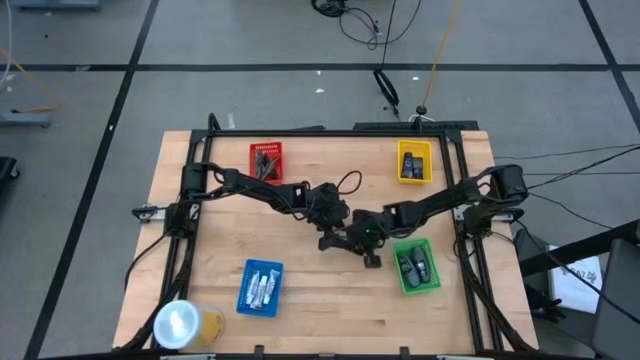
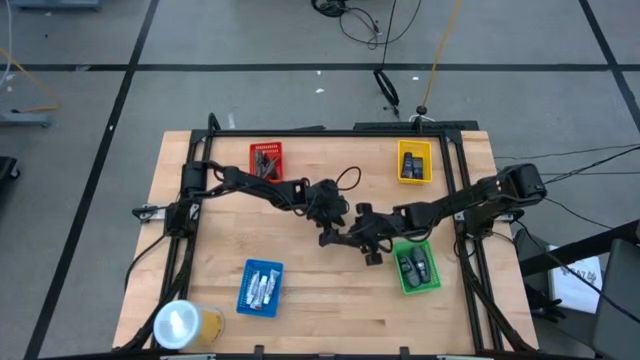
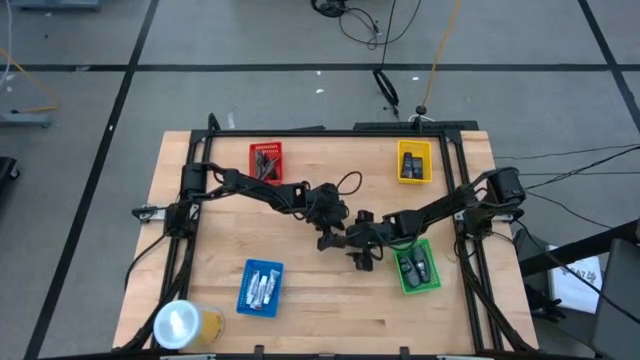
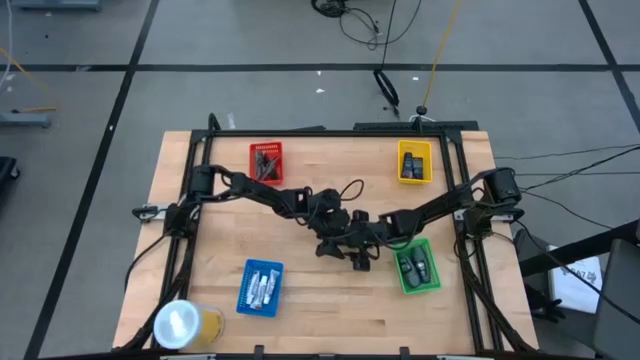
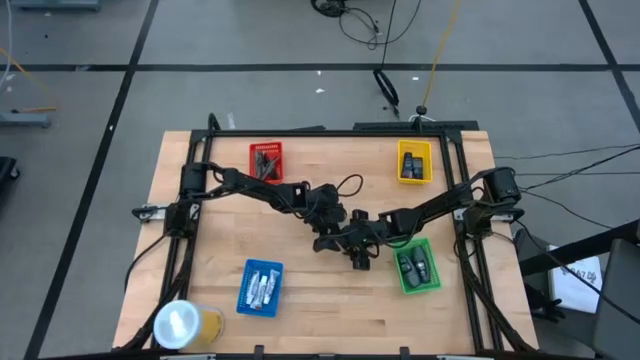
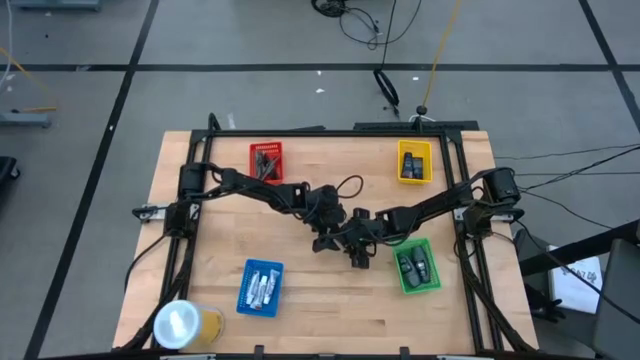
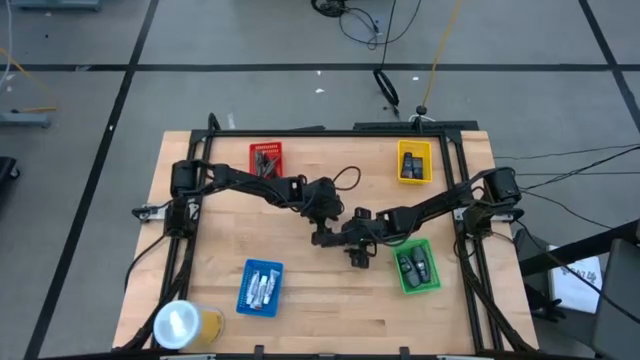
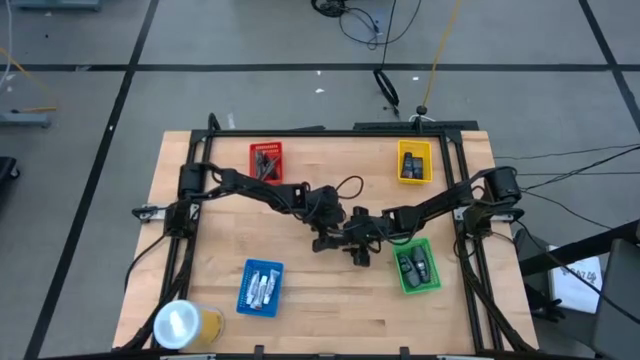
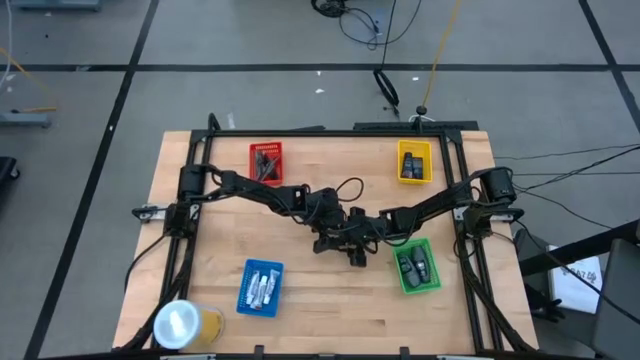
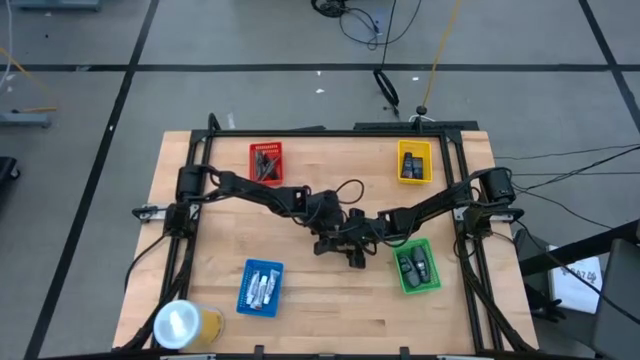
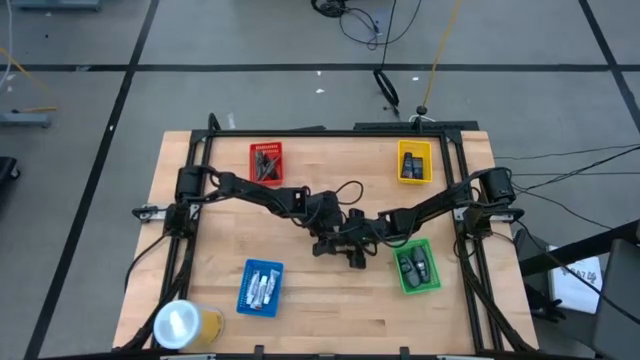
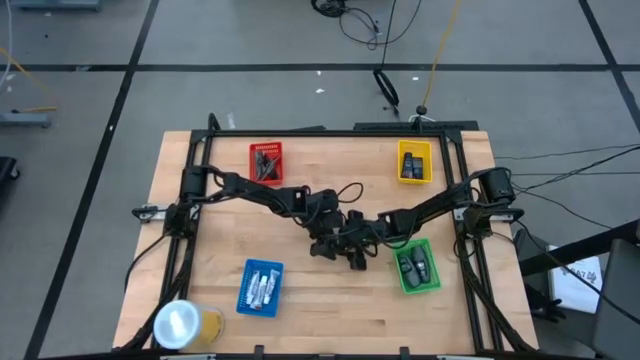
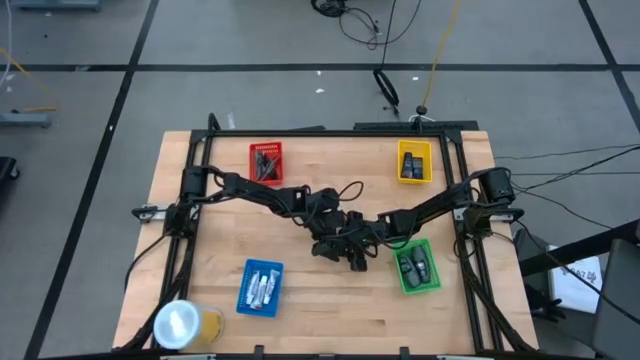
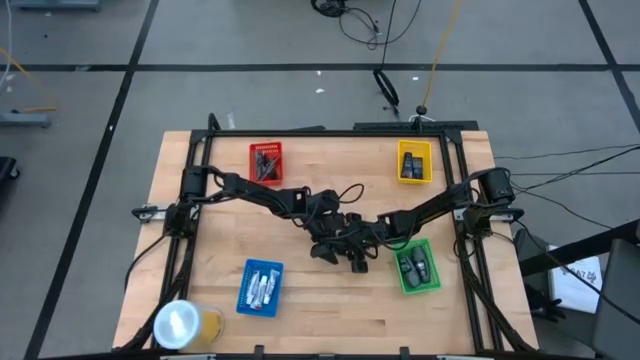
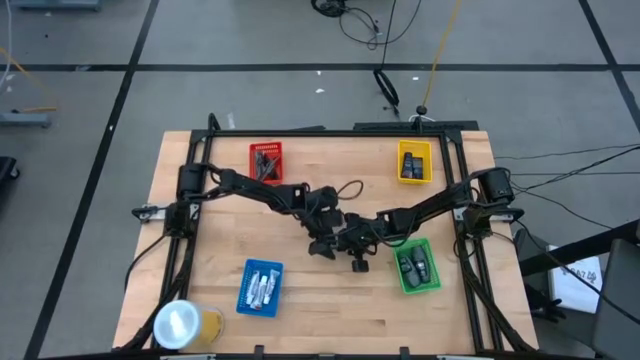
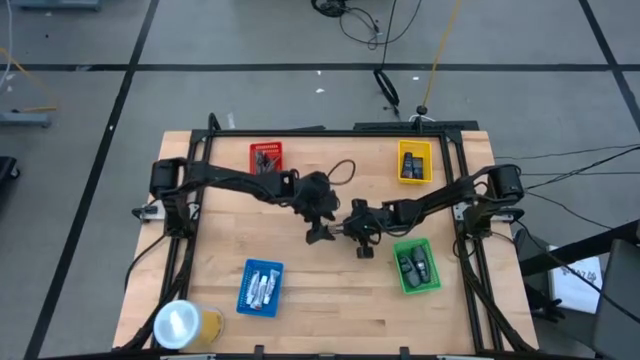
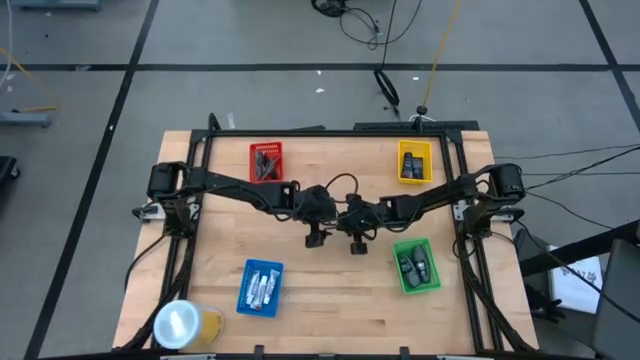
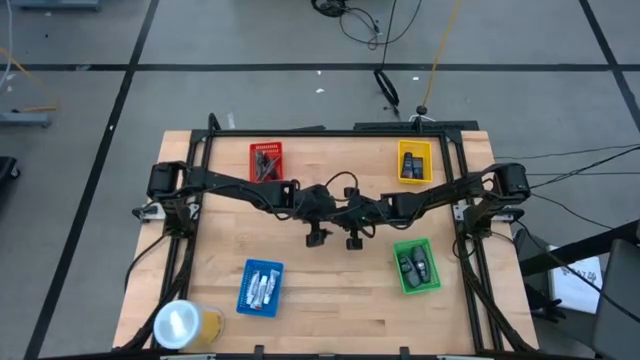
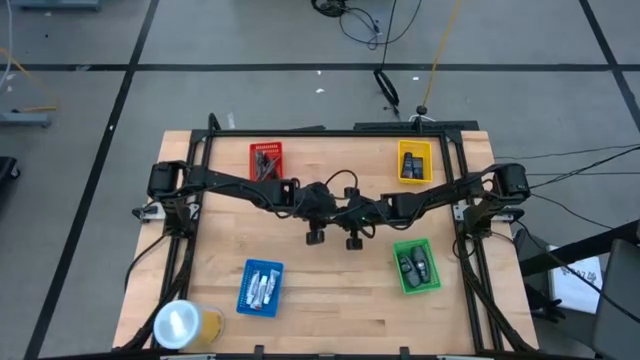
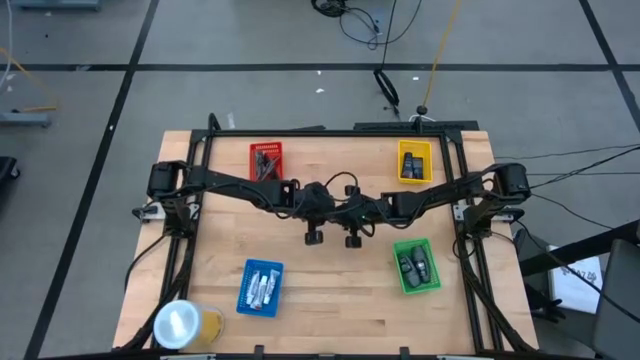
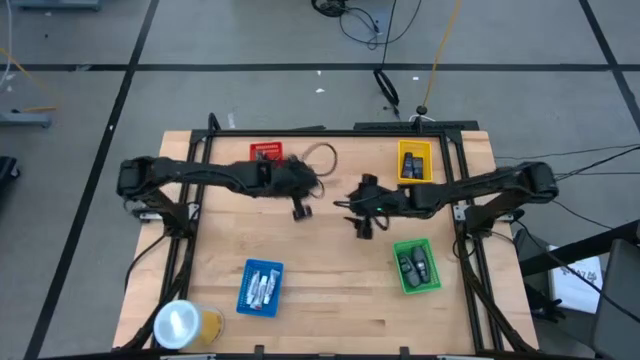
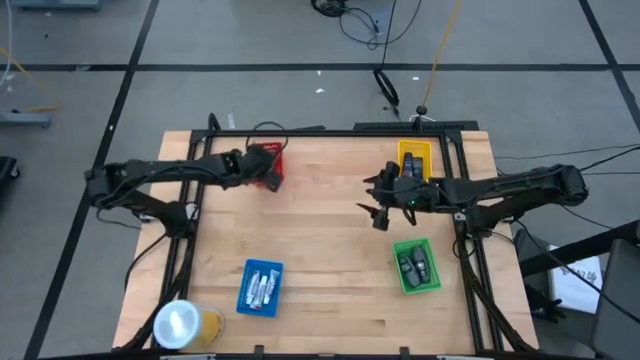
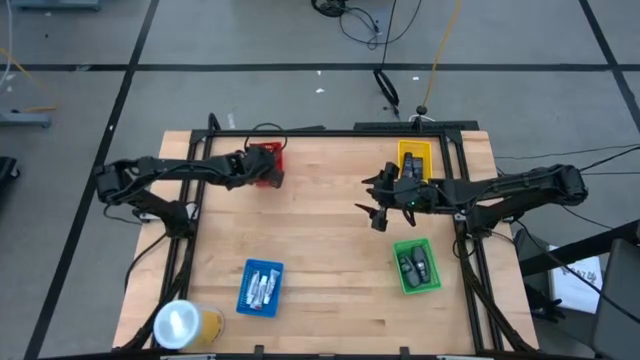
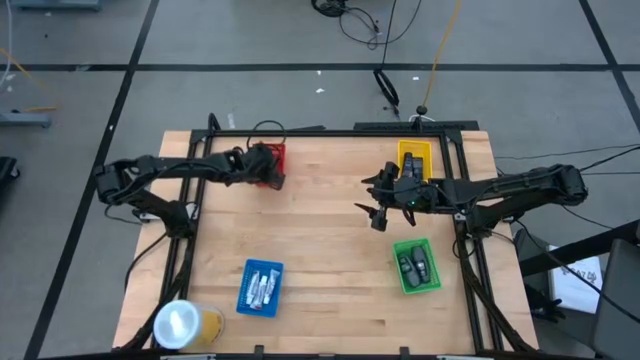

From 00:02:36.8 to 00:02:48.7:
Task: Pick & Place Travel size toiletries
Put the black comb into orange basket

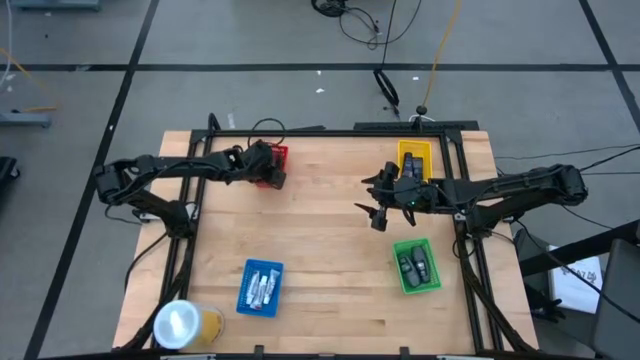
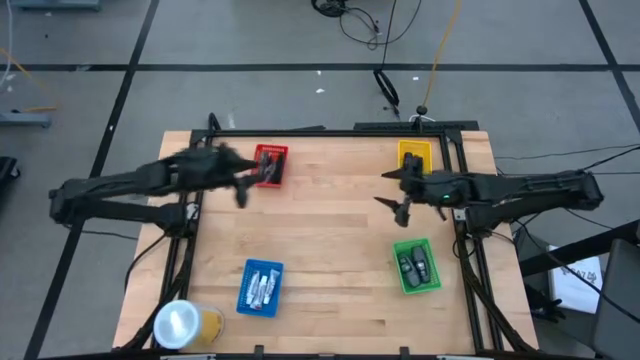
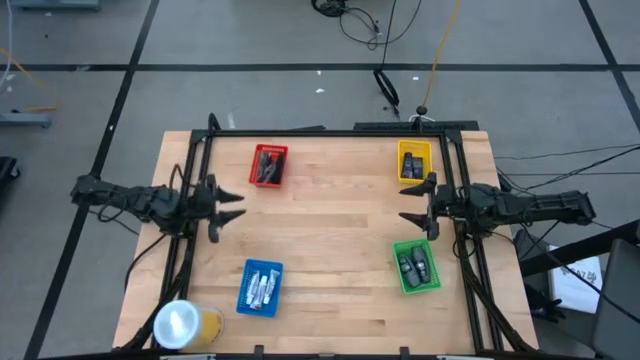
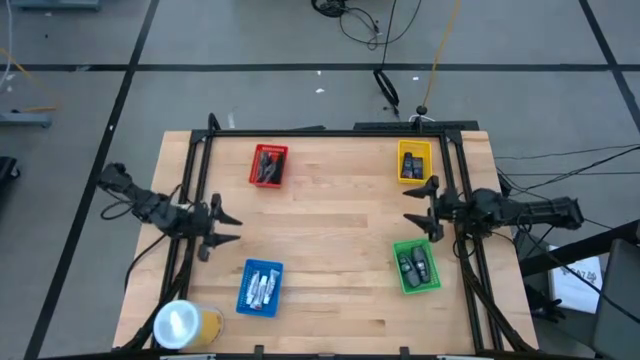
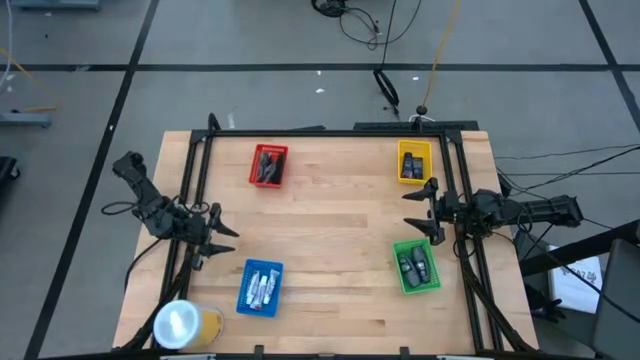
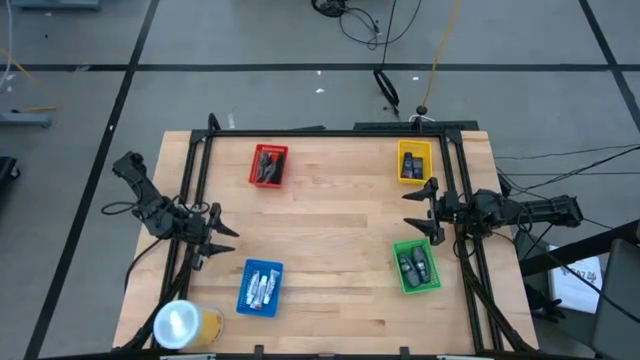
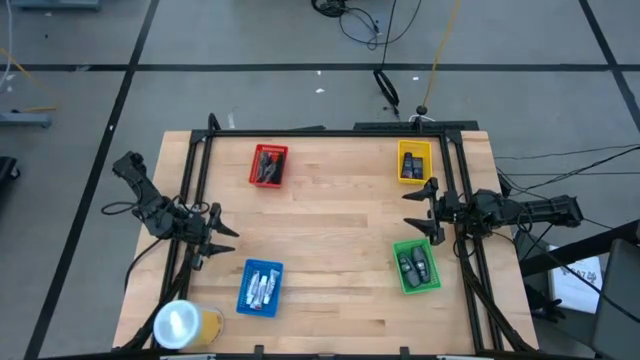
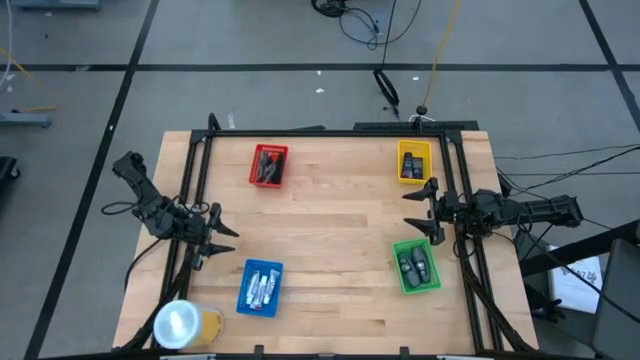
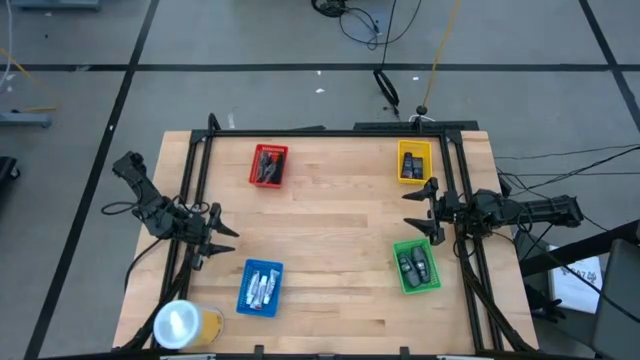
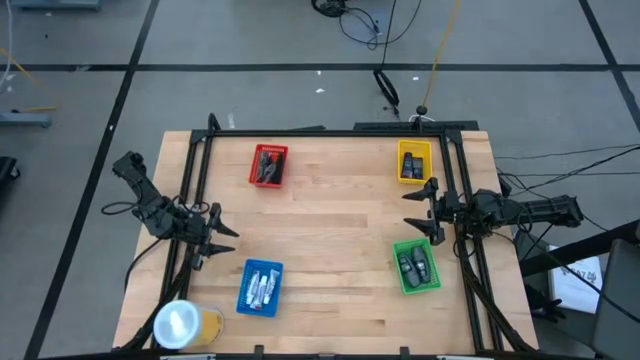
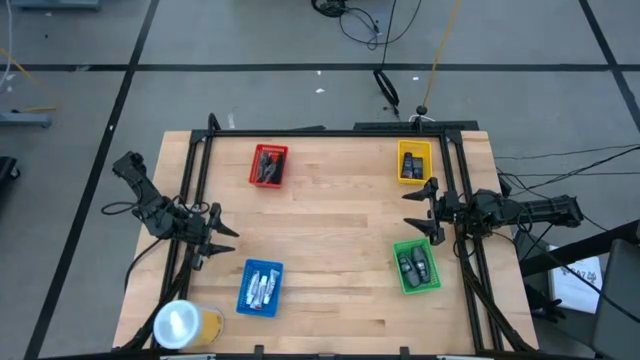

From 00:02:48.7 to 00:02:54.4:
Return to Home Position

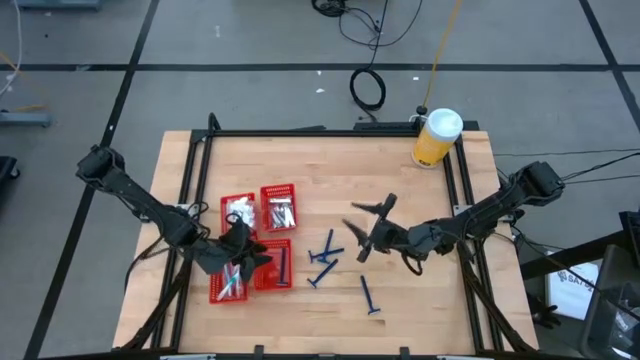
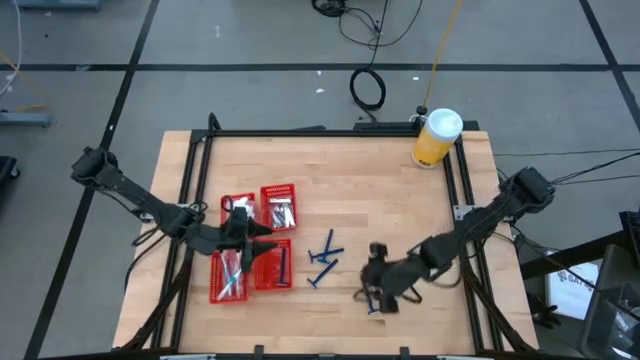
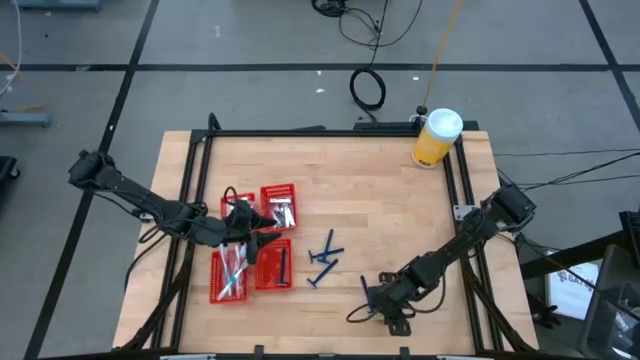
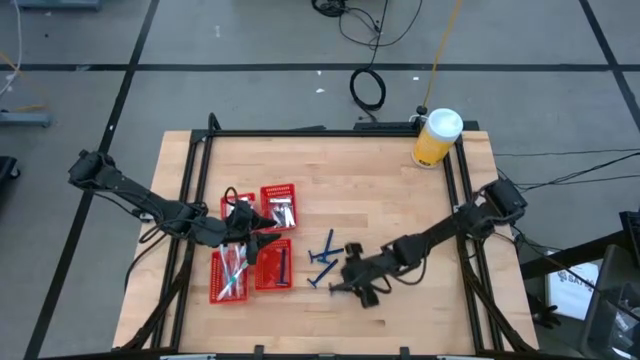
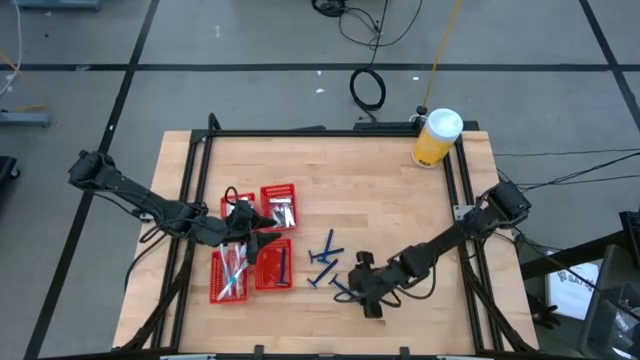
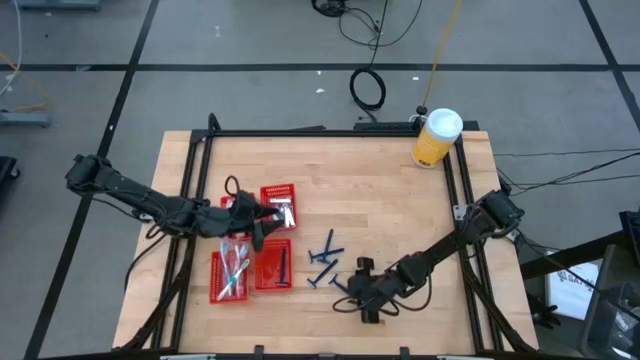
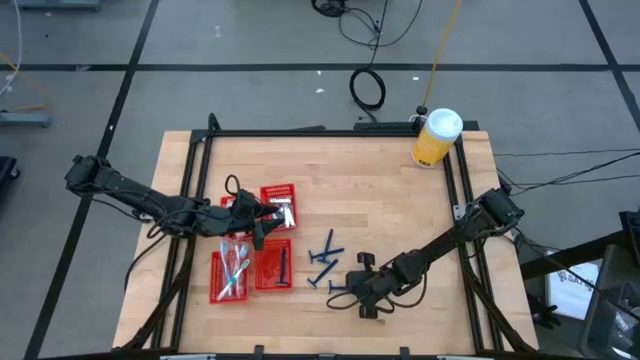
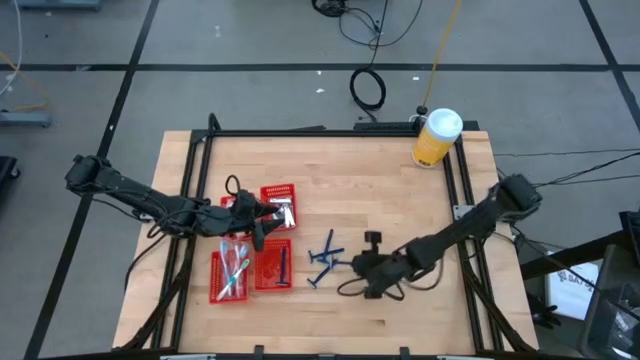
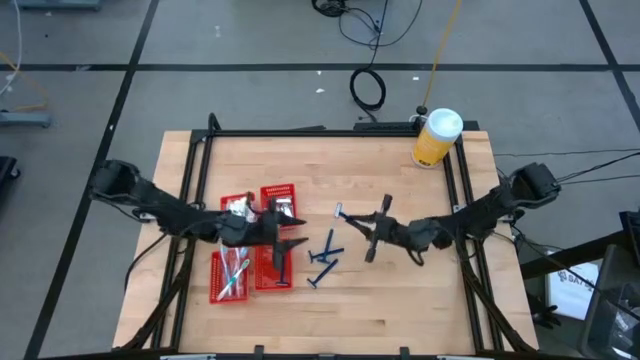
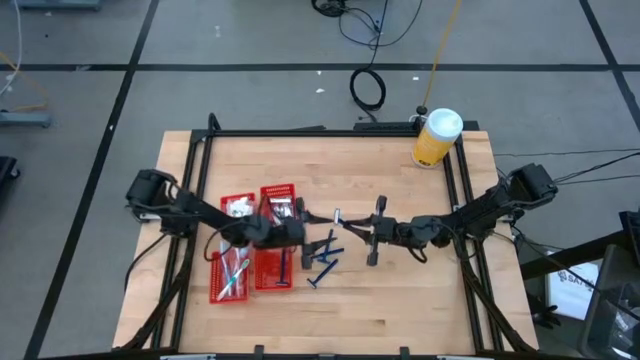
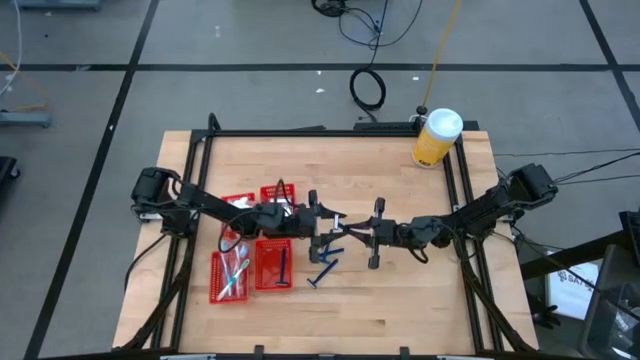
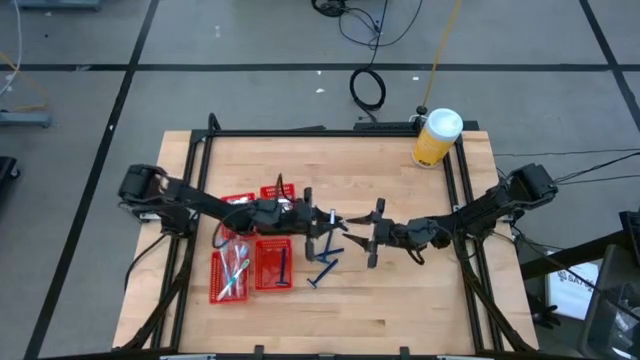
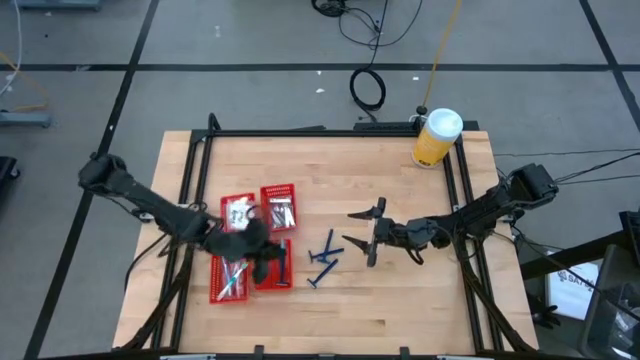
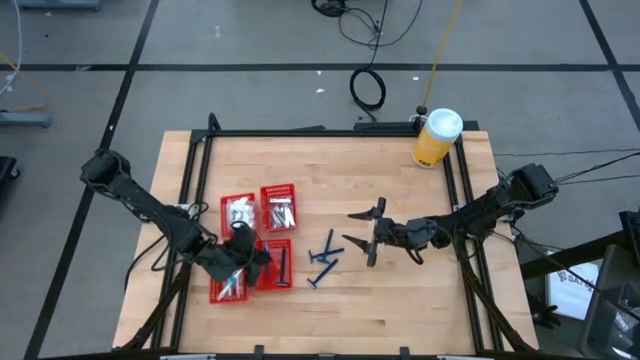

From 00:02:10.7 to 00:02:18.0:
Task: Pick & Place Travel size toiletries
Put the blue razor into the bottom right red basket
